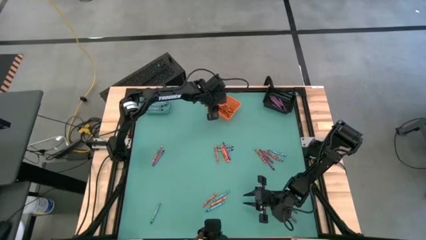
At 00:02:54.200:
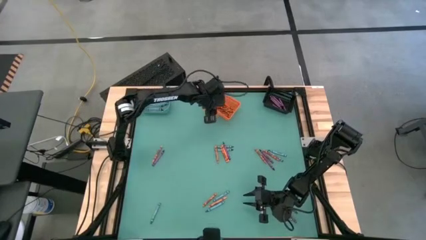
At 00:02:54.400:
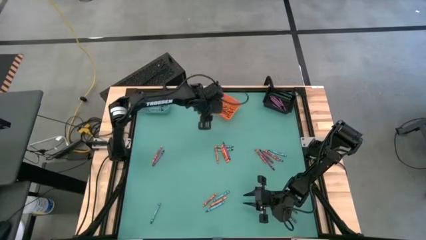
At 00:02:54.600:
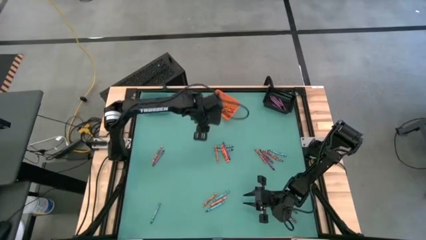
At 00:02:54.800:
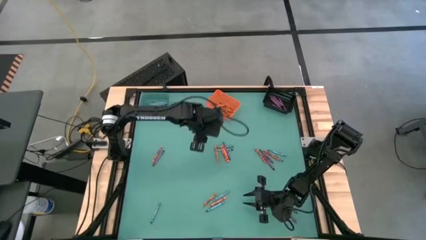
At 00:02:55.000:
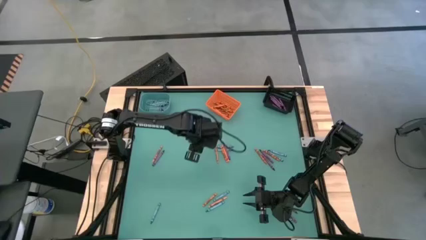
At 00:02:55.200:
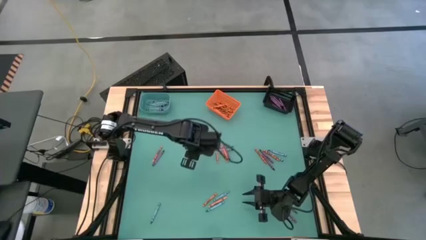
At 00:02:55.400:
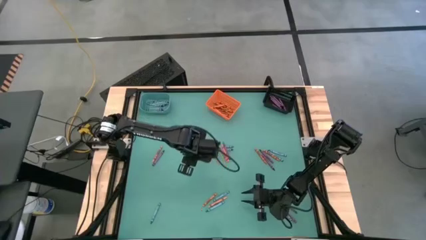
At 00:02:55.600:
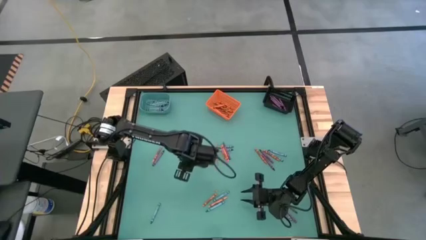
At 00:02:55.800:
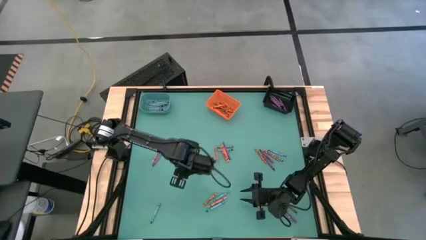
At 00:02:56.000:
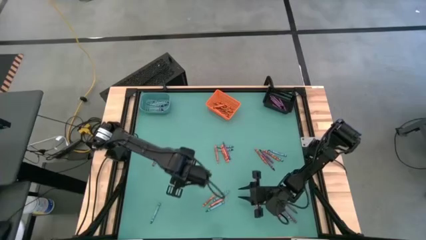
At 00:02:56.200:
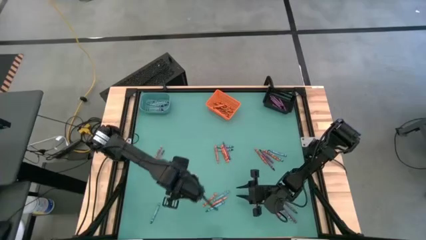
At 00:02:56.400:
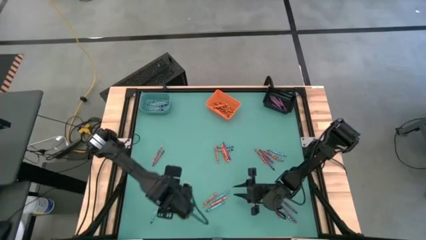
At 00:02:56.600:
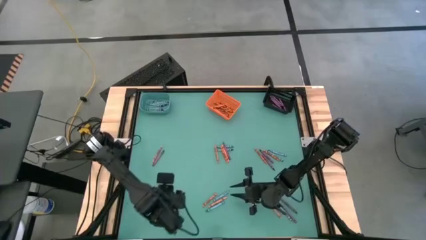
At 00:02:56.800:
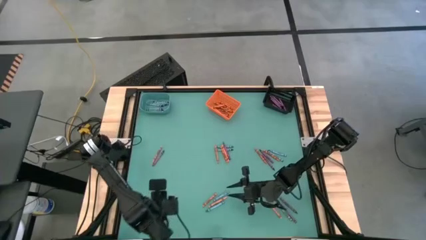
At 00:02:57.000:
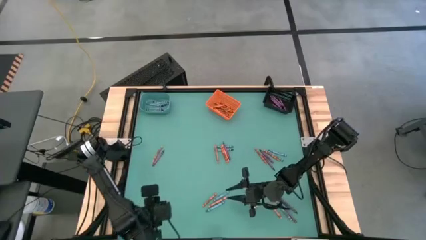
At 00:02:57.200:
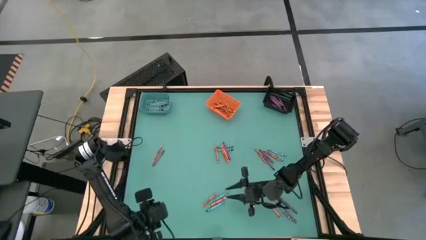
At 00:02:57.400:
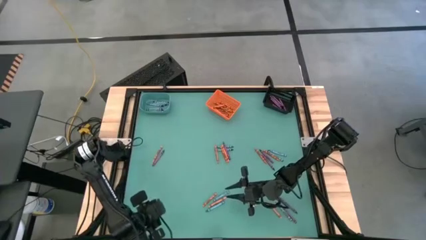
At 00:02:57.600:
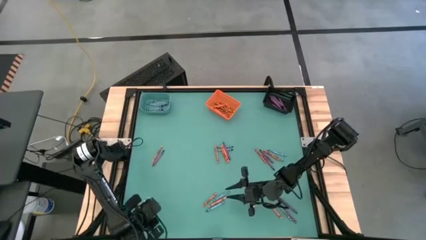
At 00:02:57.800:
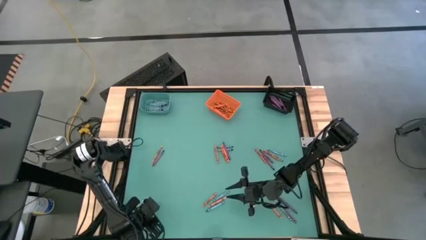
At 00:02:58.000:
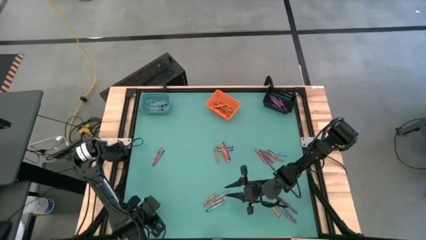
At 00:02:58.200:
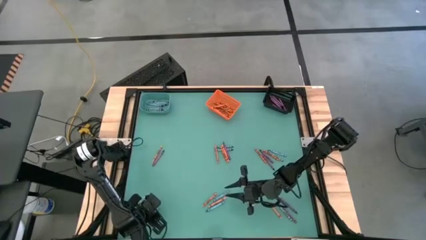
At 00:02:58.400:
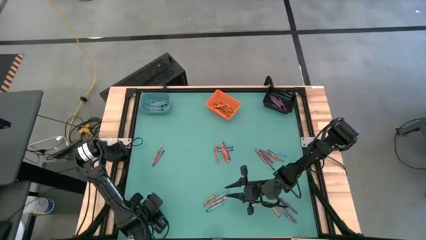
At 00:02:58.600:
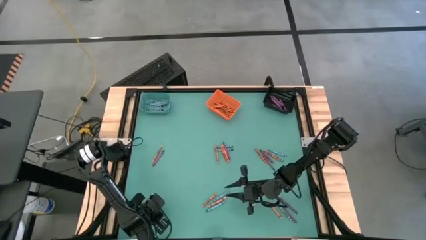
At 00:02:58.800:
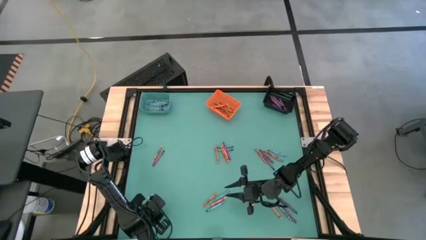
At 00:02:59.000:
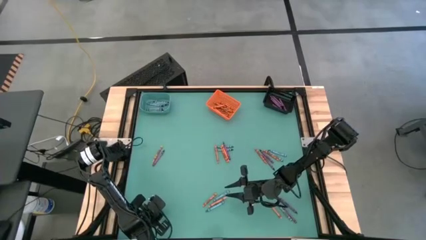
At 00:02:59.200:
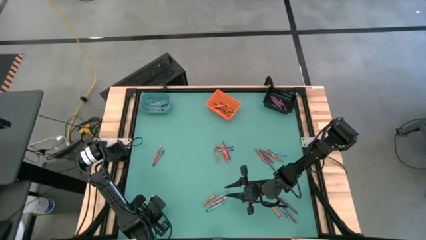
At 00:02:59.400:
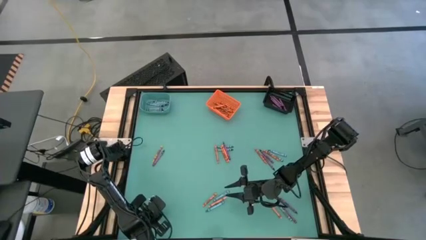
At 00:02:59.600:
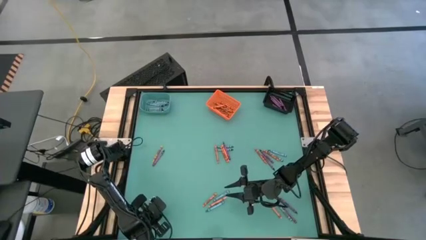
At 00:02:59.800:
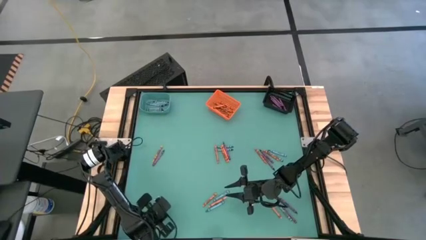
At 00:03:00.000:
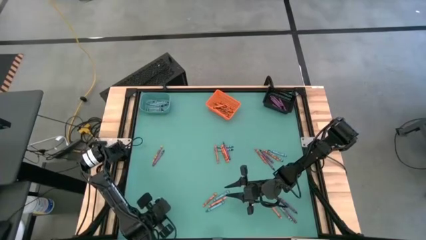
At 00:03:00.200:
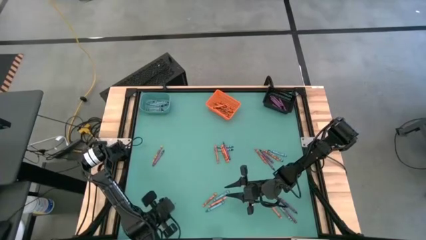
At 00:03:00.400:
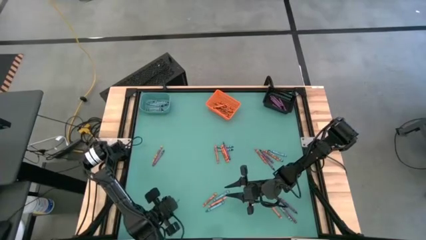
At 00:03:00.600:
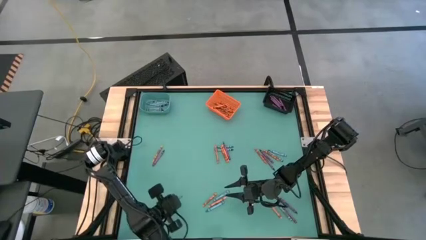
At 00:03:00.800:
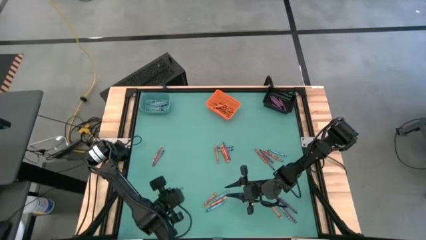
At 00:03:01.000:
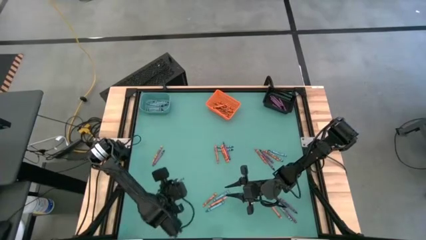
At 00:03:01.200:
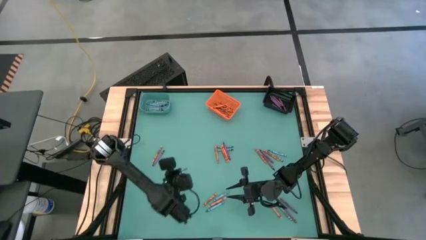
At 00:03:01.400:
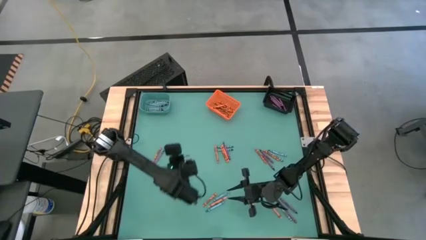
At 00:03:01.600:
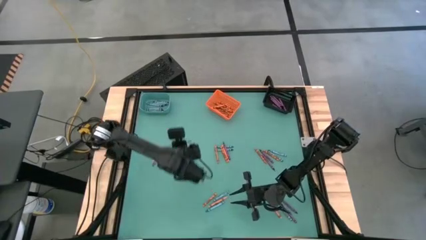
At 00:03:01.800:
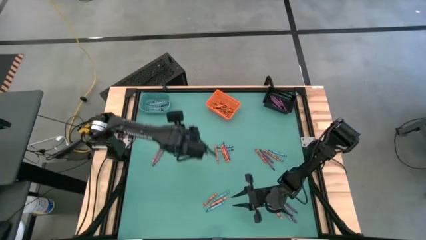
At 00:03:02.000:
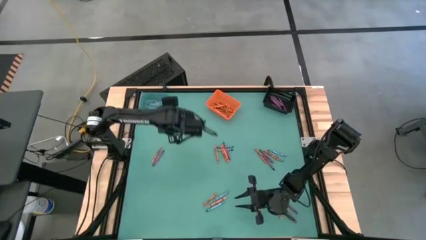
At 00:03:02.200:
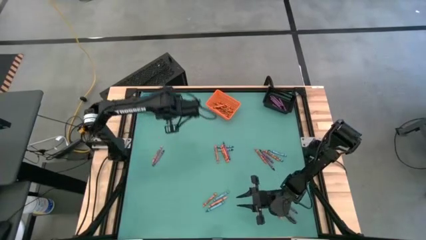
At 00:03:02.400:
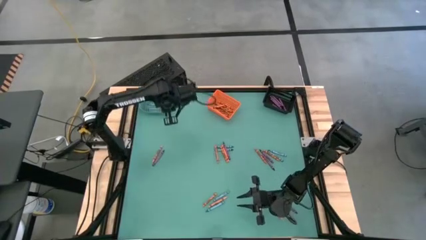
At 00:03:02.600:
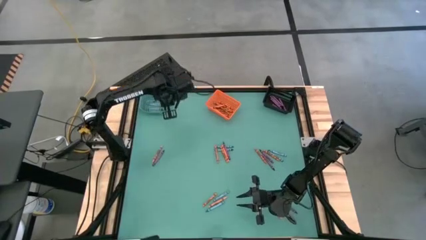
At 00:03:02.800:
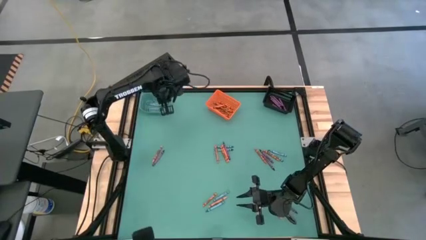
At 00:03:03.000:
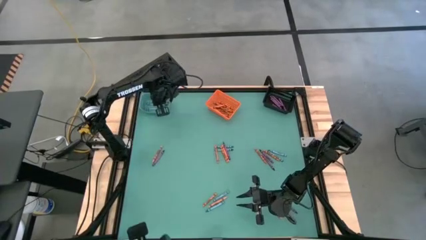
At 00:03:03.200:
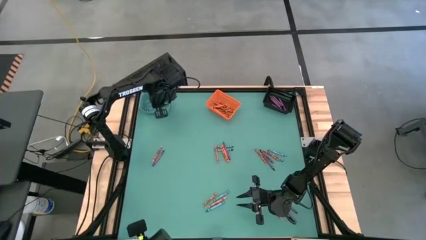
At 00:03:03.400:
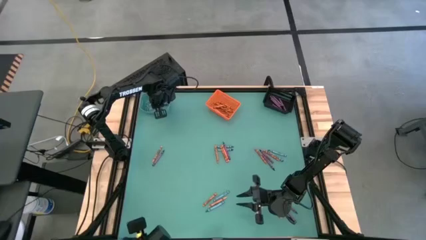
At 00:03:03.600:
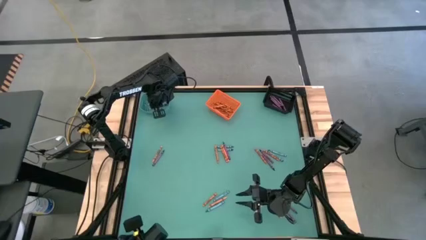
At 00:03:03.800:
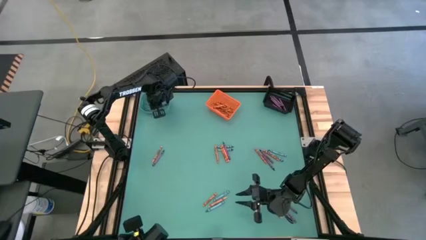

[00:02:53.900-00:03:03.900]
Task: Sort crayons
Put the blue crayon into the blue bin

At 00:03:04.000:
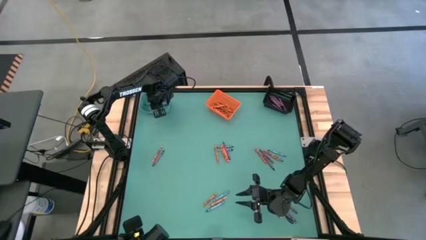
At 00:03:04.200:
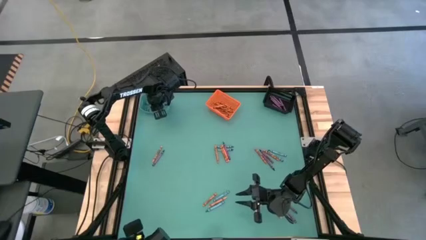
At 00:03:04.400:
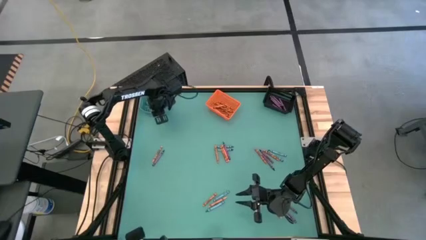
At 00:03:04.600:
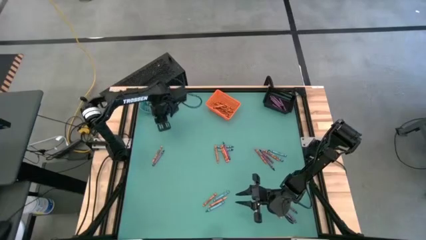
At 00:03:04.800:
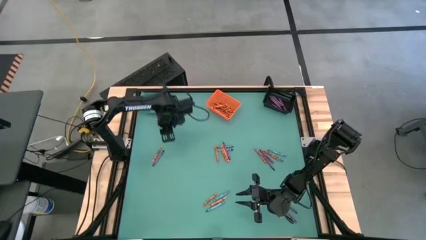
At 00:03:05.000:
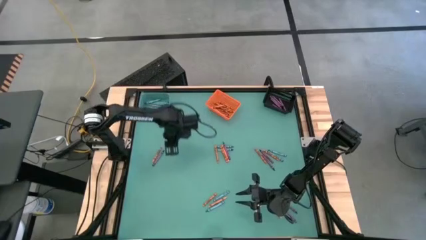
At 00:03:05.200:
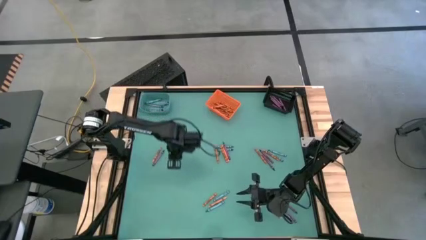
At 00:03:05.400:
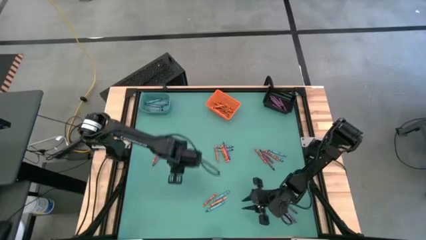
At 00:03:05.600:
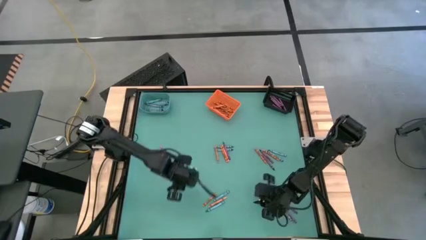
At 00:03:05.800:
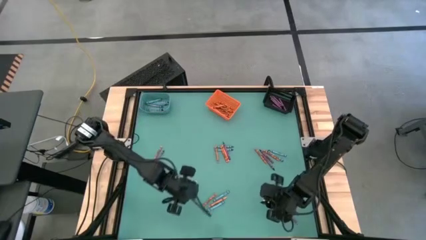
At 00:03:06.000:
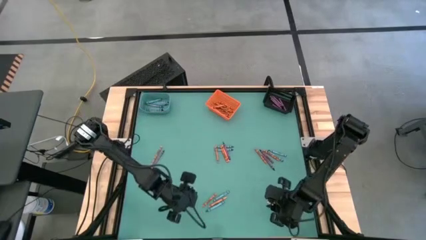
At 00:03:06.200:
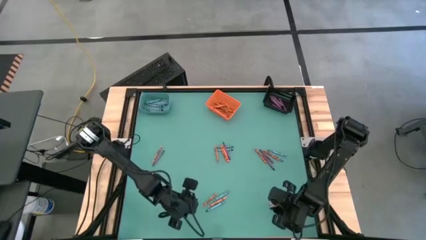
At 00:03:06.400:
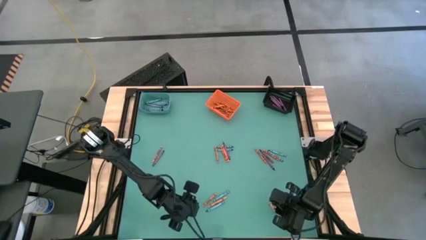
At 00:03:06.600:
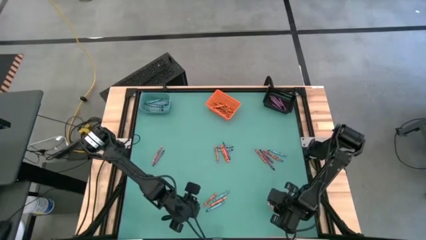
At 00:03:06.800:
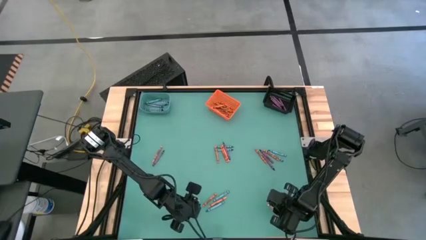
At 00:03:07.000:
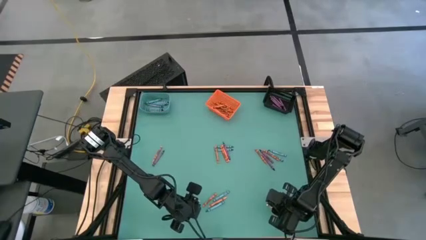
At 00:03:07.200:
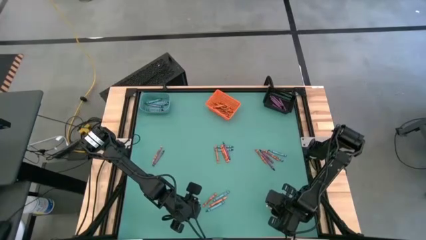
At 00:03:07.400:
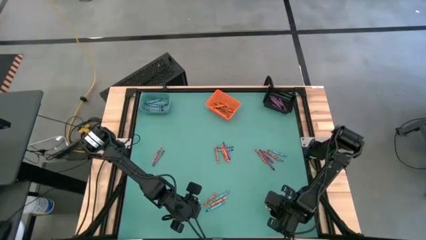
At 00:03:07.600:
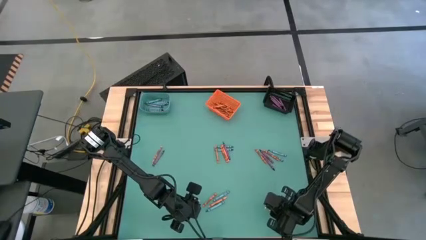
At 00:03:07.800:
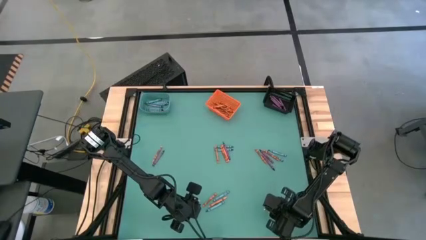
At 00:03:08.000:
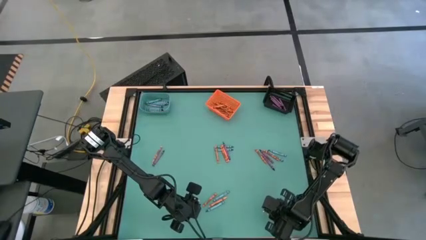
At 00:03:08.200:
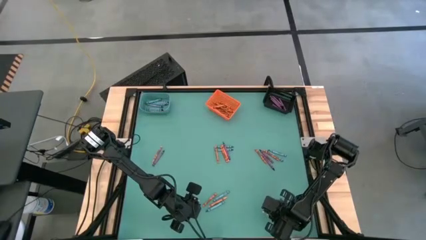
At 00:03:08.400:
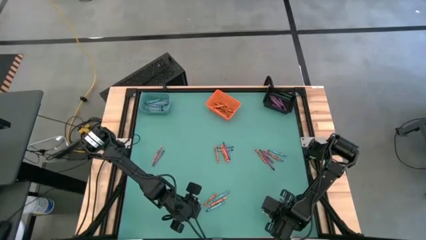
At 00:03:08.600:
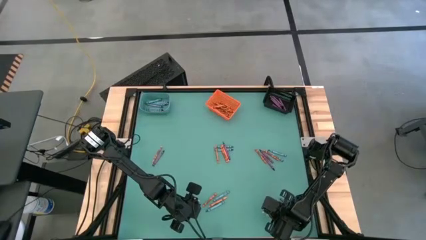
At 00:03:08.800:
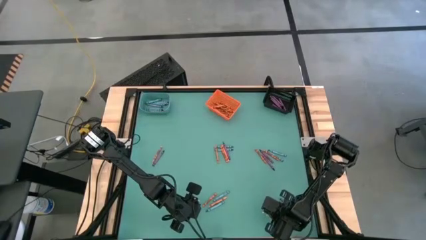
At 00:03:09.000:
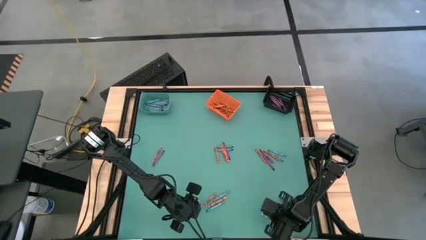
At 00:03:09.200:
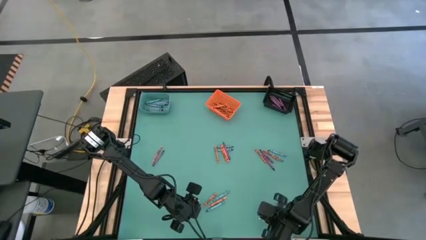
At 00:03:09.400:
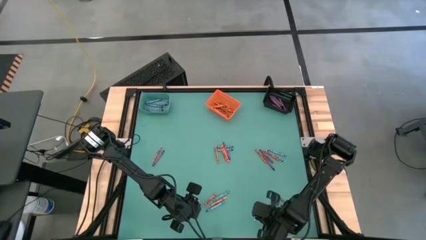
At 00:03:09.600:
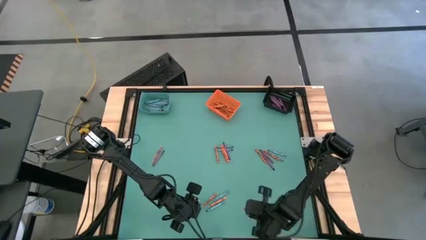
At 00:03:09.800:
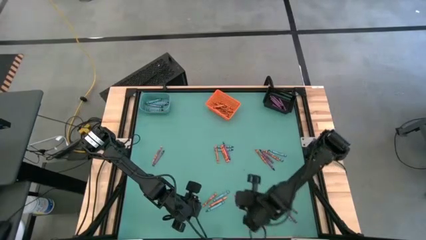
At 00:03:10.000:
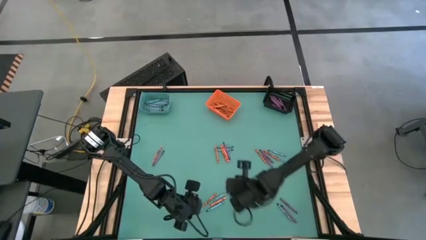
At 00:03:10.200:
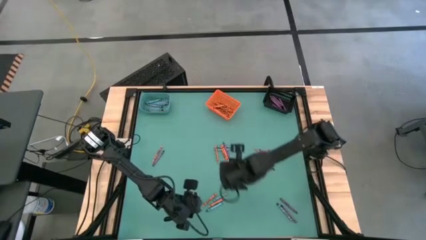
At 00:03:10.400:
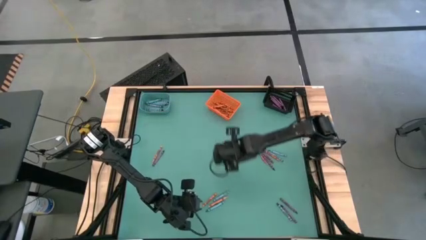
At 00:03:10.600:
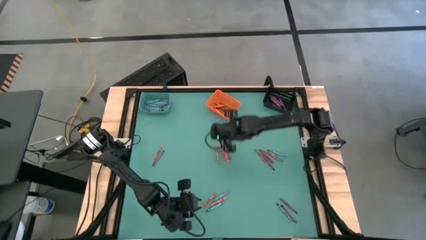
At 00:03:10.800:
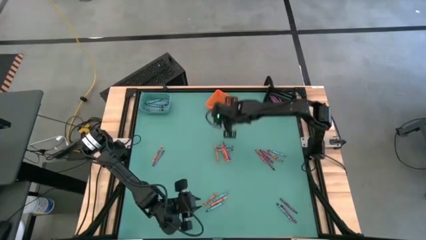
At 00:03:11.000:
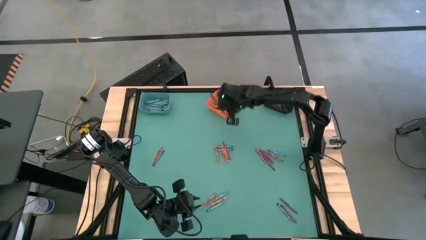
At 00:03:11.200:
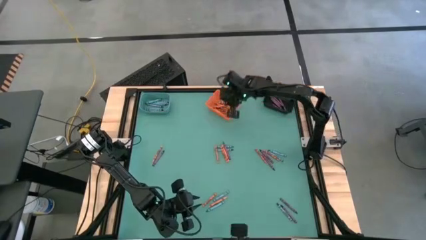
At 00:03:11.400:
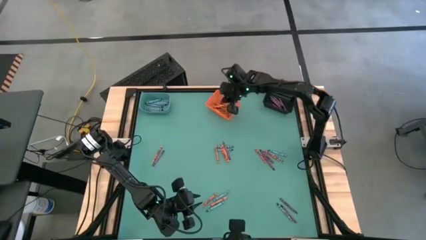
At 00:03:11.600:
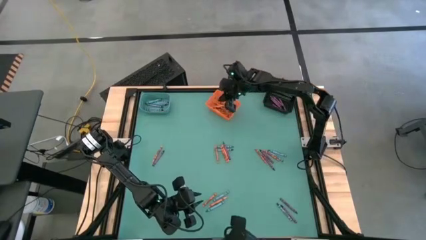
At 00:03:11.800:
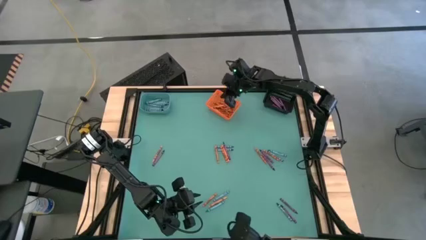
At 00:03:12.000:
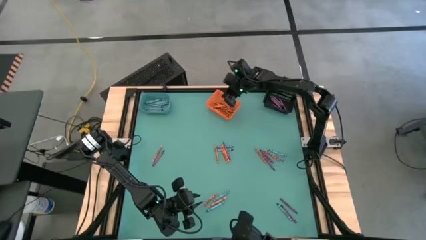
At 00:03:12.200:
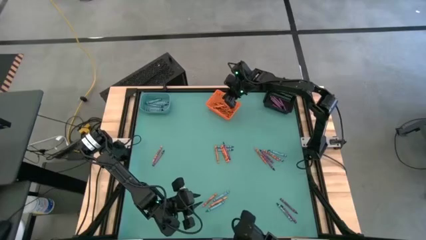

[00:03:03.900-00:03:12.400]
Put the orange crayon into the orange bin
